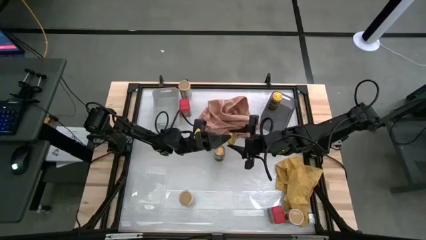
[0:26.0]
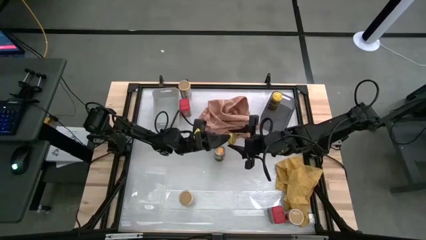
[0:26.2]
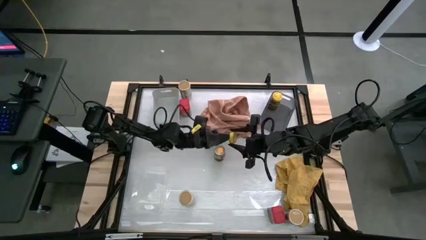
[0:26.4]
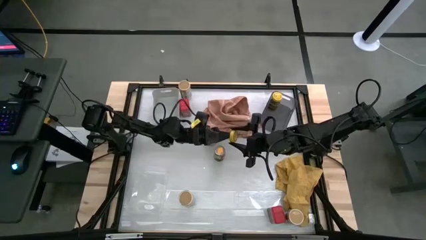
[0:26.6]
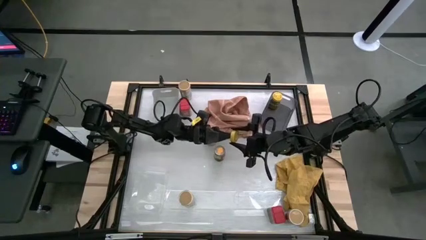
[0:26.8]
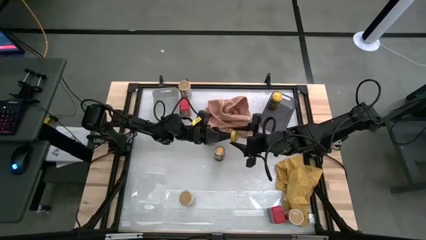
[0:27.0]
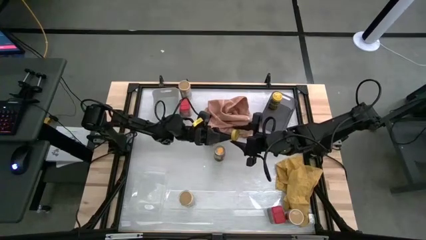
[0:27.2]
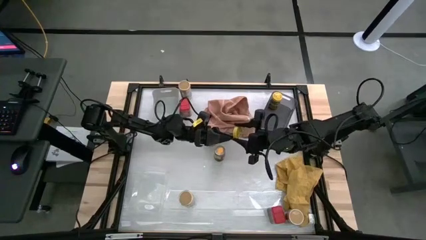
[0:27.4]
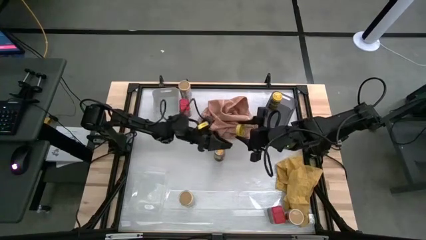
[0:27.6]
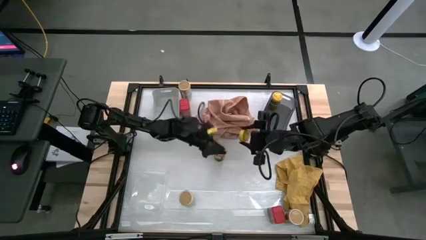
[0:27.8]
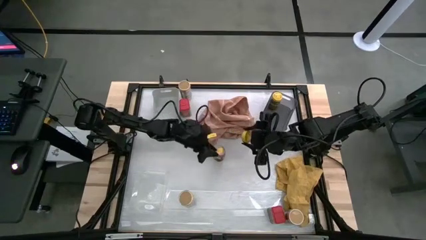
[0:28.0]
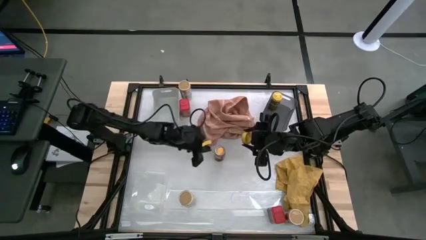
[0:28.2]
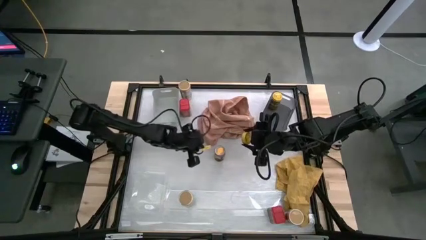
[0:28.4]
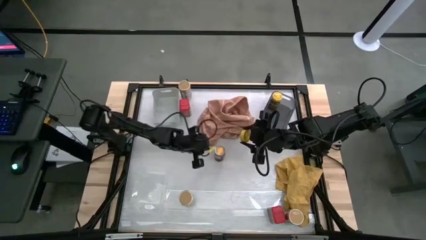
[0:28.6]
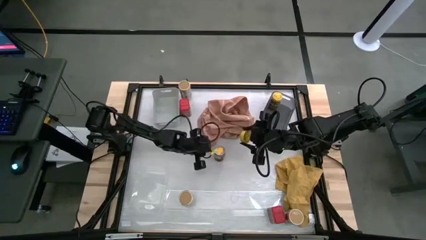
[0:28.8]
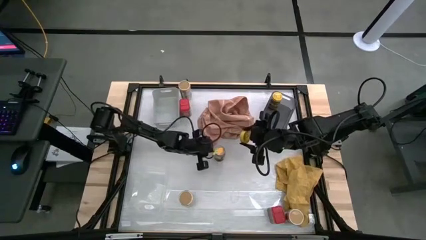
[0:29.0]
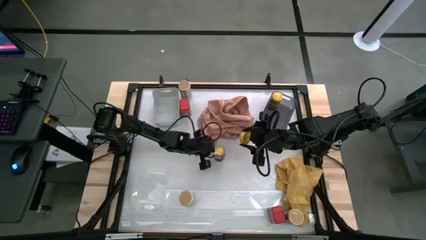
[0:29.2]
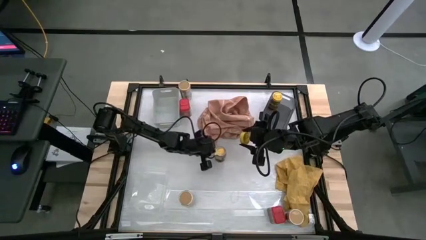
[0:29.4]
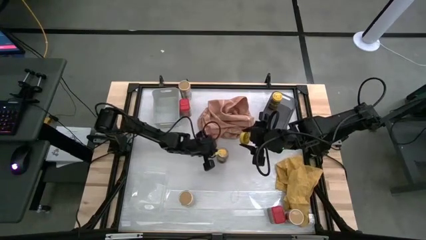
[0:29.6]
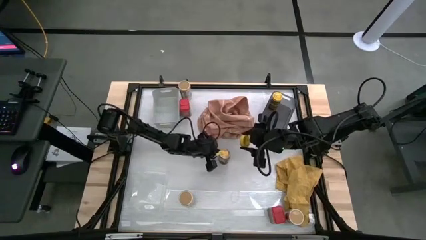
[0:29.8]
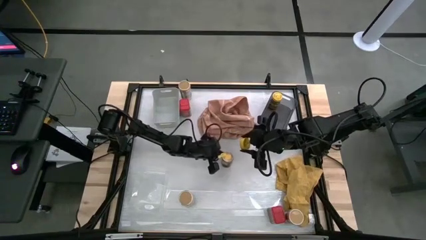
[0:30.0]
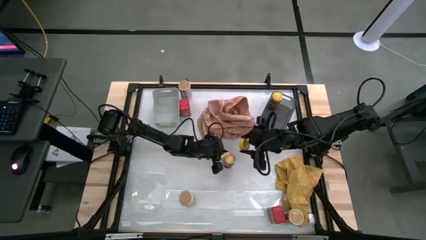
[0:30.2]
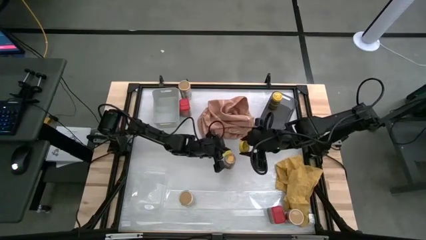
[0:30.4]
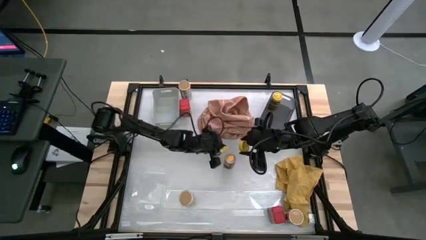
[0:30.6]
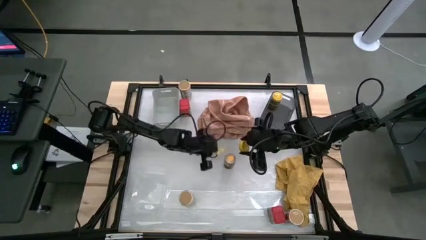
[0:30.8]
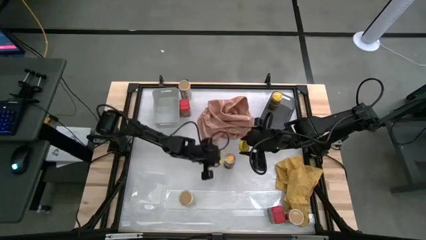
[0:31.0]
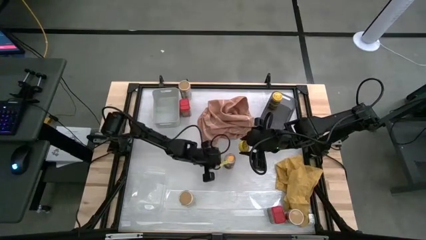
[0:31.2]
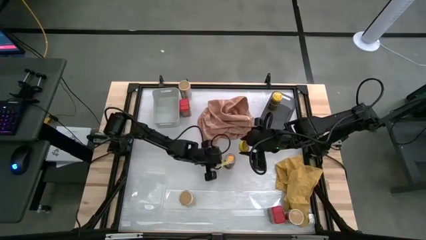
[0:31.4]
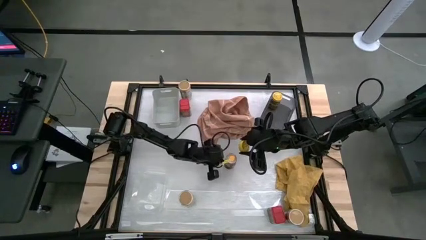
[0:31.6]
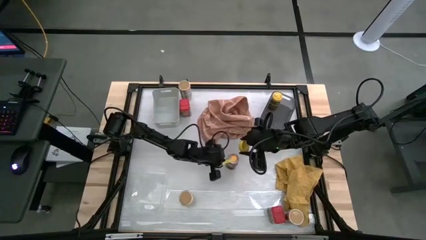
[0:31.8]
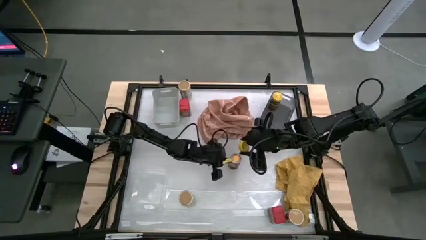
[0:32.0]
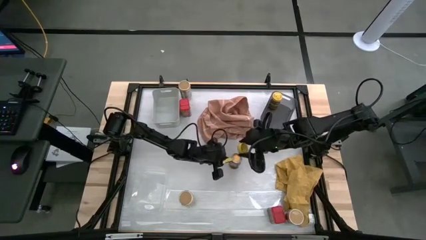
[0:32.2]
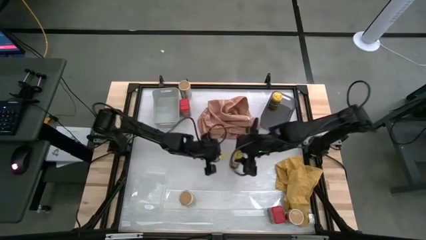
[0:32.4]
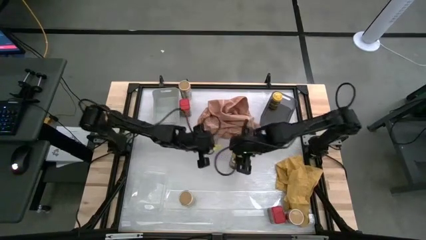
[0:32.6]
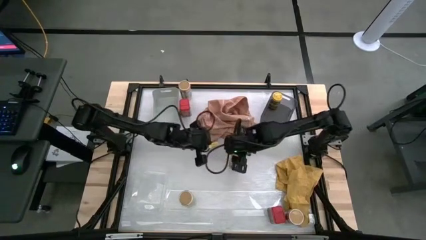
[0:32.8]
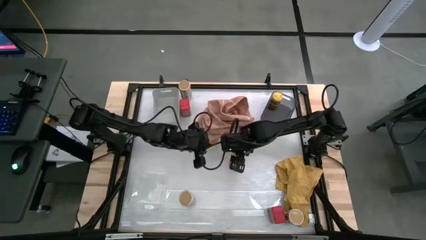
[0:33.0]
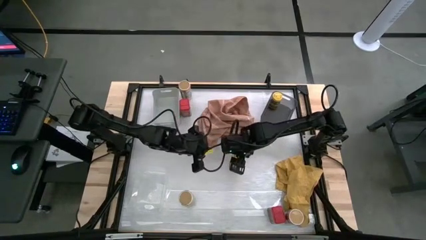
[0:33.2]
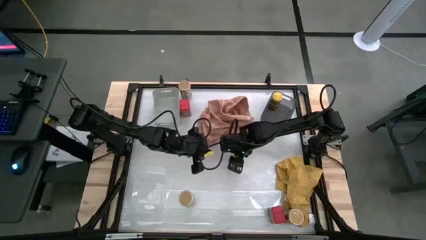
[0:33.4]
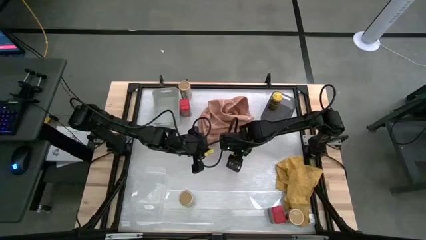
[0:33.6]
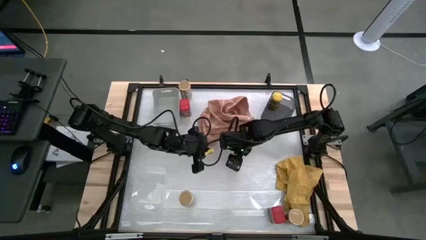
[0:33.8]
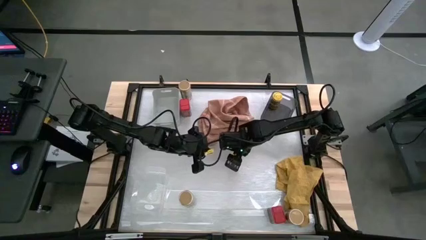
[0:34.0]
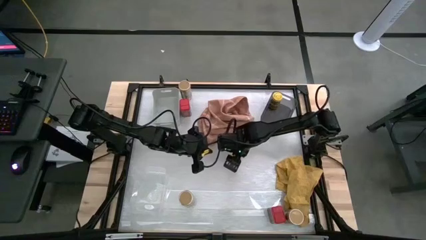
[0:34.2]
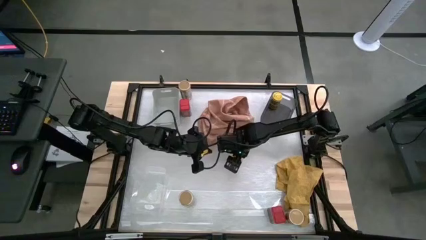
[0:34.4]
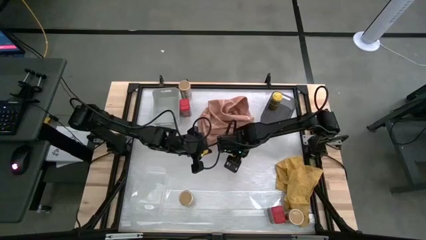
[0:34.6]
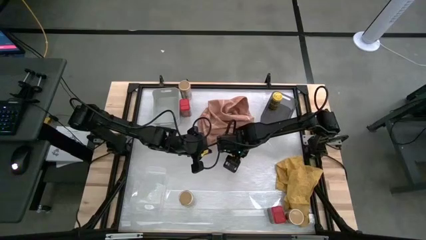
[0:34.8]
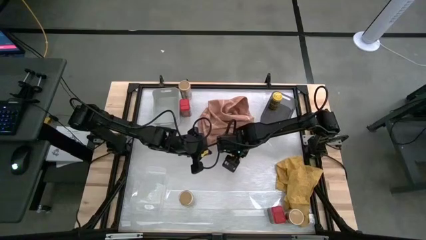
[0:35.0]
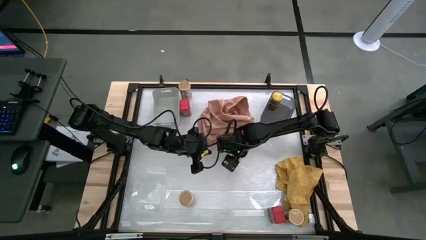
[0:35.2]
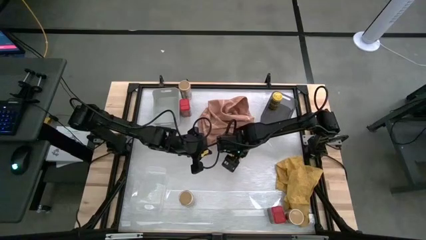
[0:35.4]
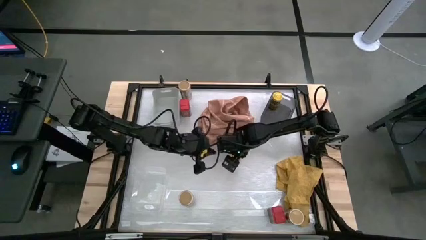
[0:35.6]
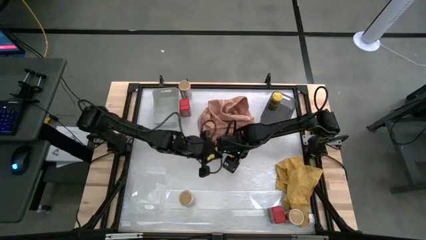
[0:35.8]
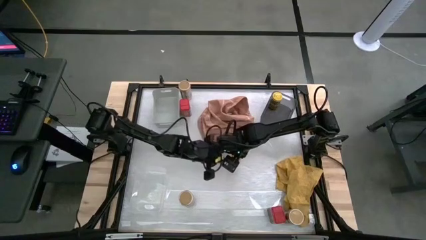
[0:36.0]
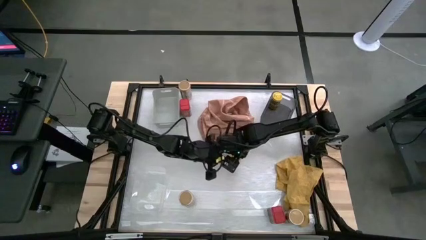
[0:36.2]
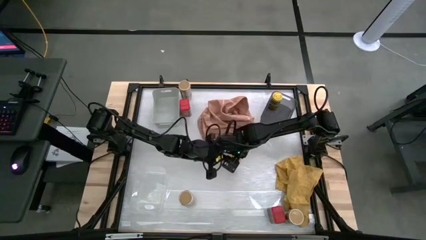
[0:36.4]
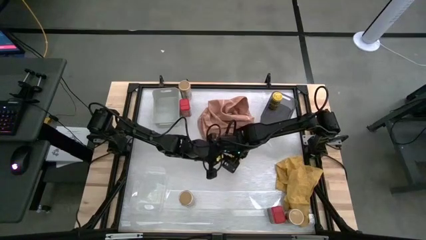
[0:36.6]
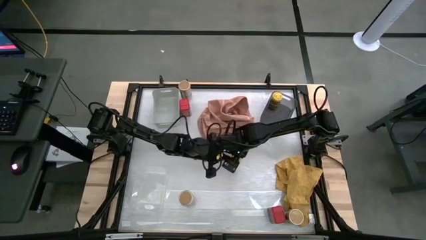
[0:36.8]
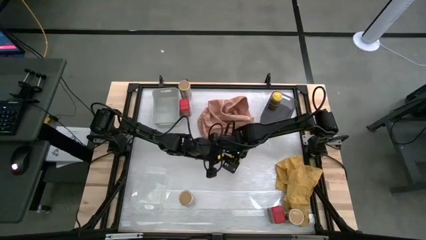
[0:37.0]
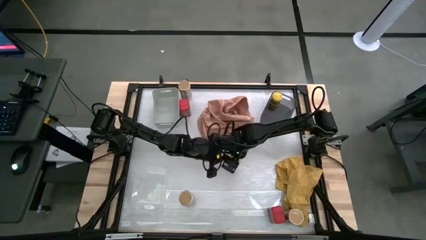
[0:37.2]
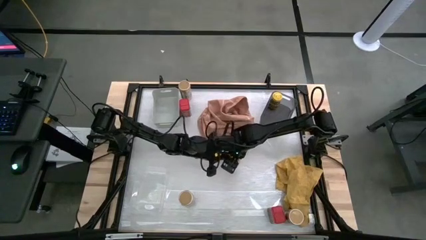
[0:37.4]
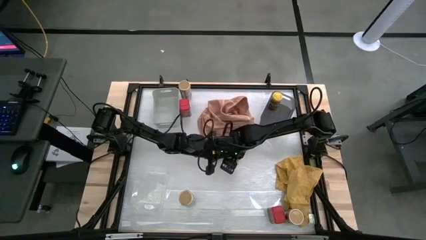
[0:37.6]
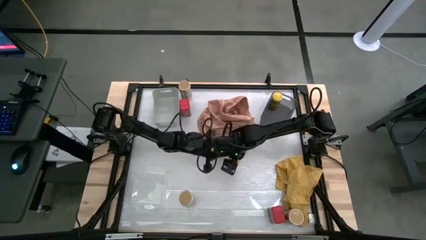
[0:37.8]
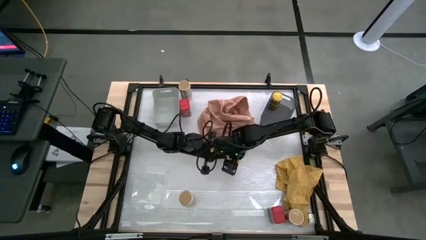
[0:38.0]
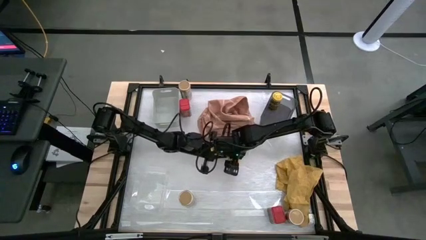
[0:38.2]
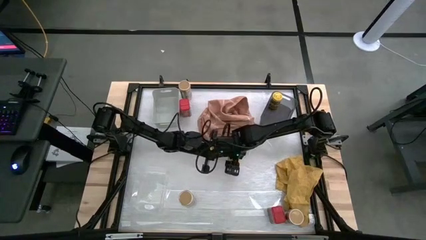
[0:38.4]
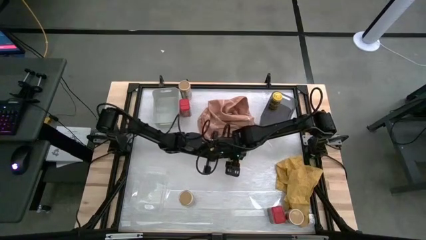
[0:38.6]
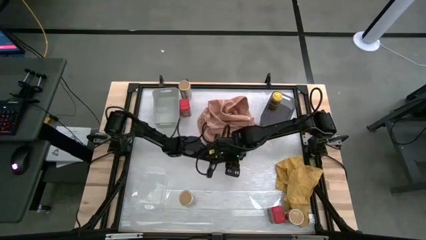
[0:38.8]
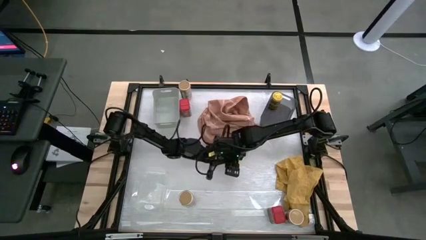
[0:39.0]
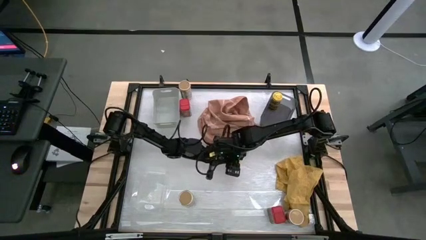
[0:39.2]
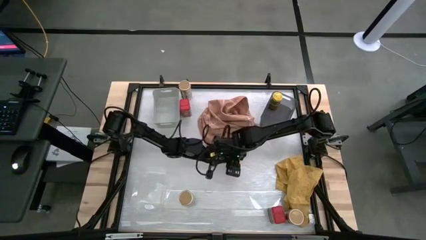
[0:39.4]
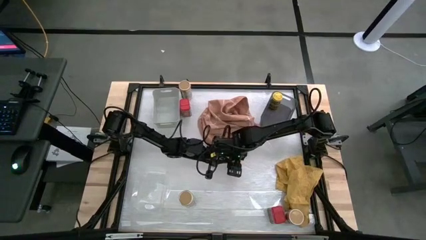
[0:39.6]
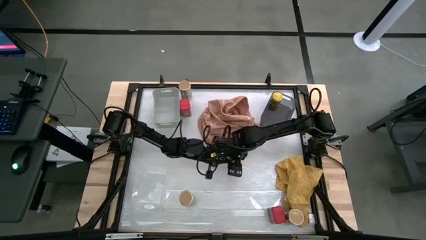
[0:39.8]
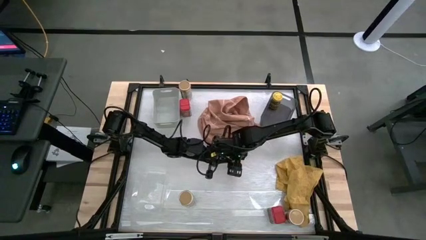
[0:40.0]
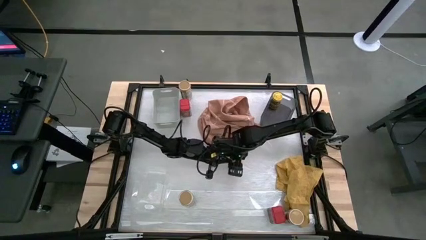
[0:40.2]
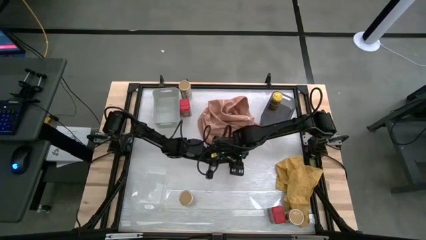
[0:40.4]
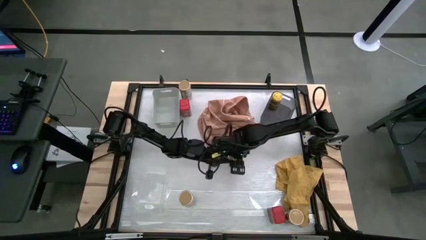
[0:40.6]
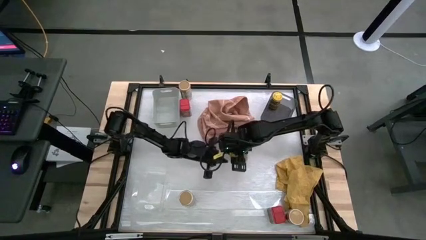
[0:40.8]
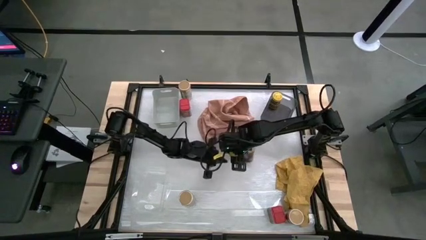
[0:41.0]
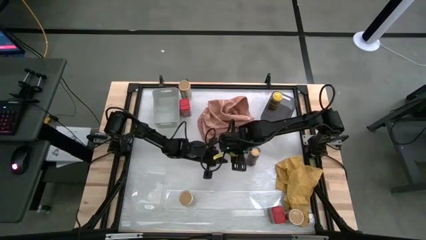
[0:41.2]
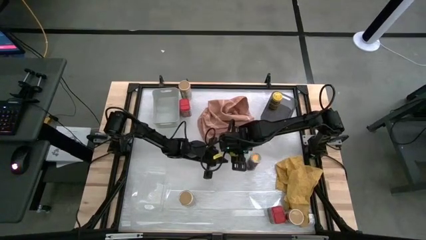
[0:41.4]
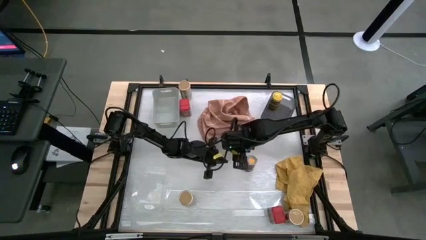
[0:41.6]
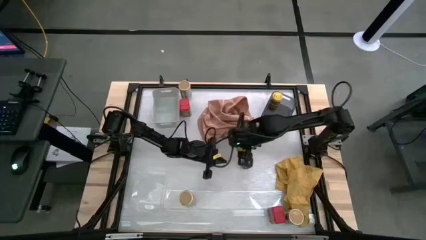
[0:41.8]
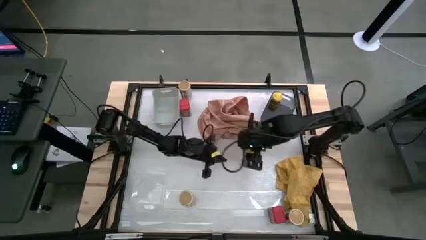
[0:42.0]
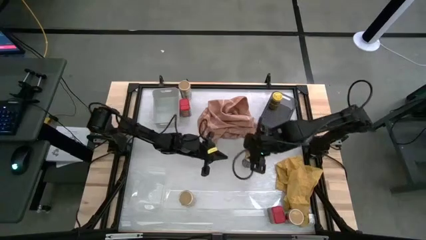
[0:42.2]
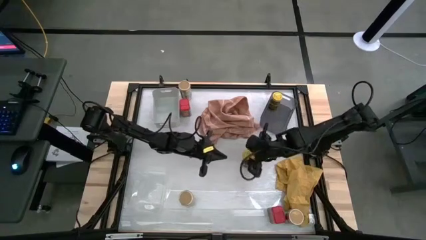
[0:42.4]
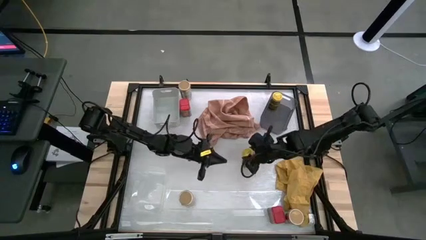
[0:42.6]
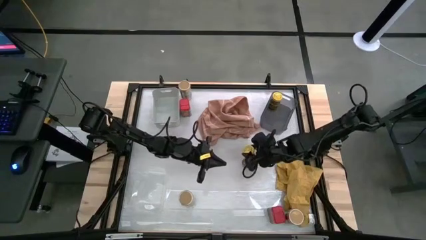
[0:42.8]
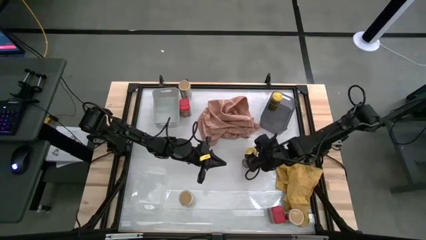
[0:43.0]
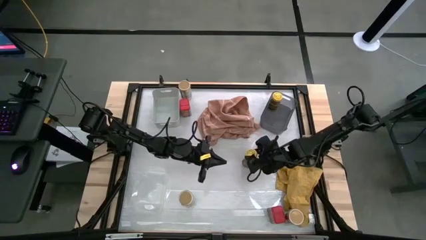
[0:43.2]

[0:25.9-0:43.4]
Task: Sort spices by type
Put the yellow seasoning bottle into the black bin
